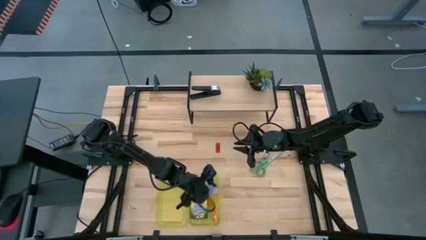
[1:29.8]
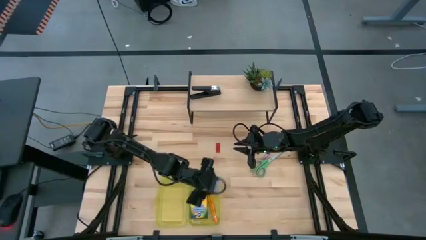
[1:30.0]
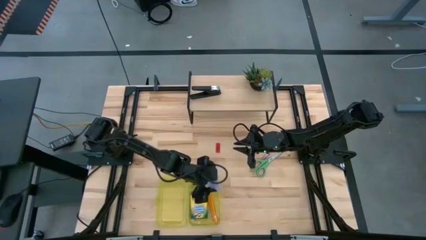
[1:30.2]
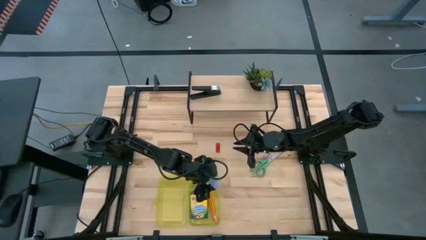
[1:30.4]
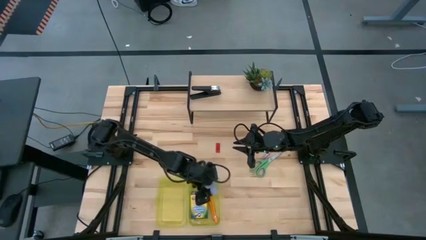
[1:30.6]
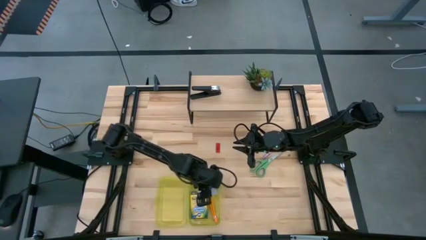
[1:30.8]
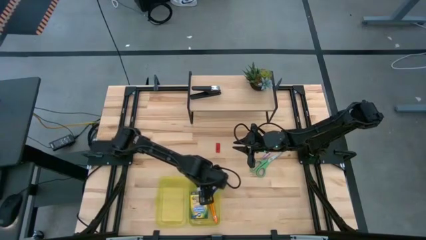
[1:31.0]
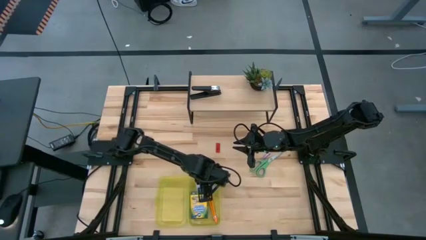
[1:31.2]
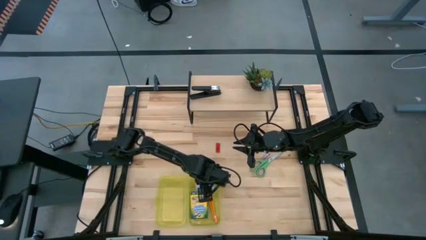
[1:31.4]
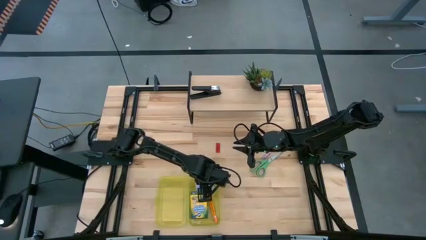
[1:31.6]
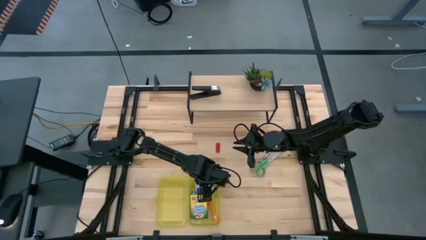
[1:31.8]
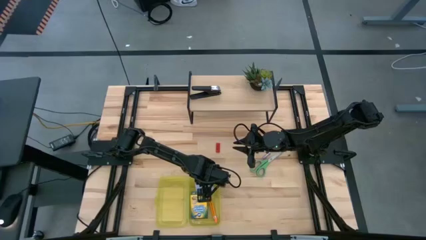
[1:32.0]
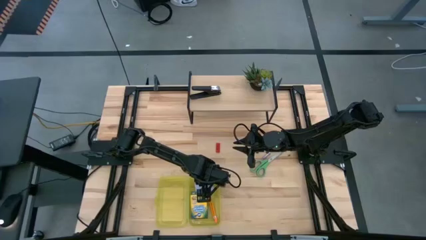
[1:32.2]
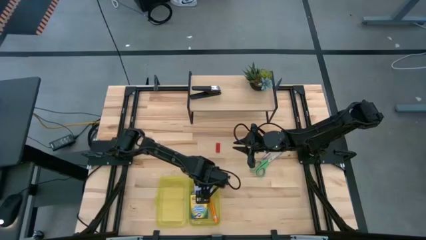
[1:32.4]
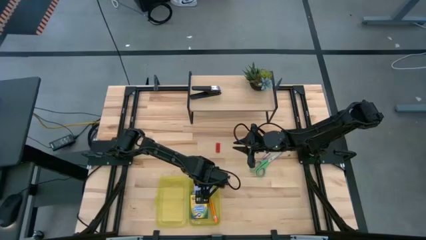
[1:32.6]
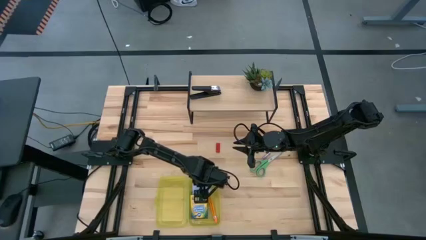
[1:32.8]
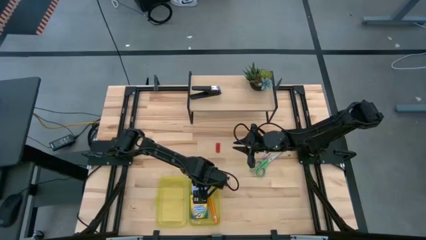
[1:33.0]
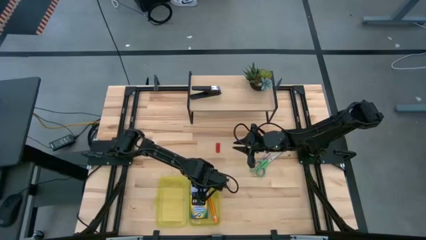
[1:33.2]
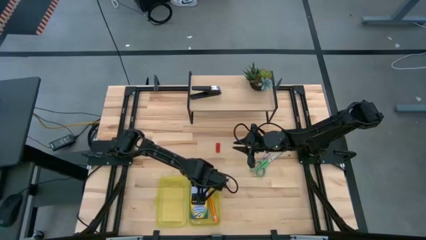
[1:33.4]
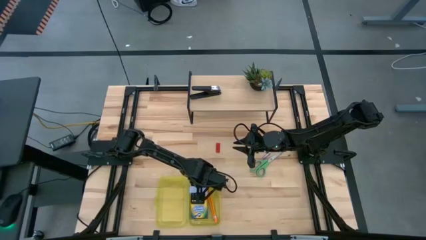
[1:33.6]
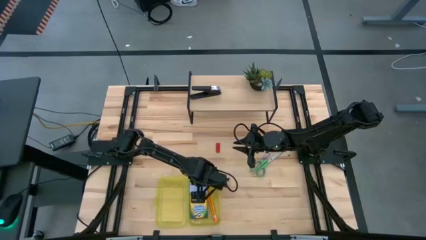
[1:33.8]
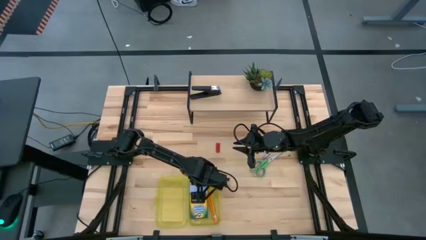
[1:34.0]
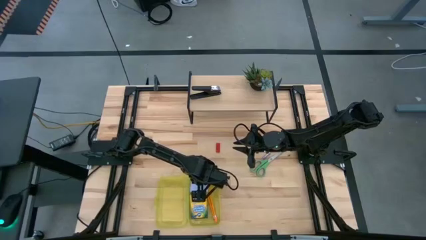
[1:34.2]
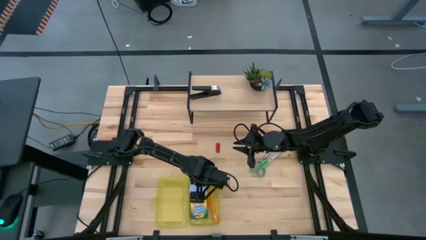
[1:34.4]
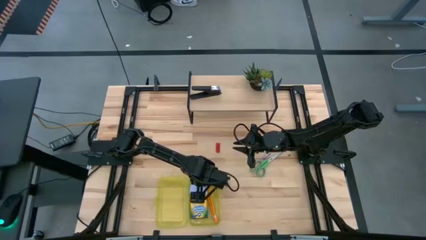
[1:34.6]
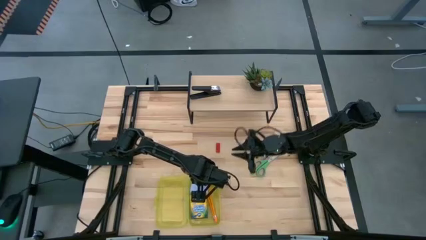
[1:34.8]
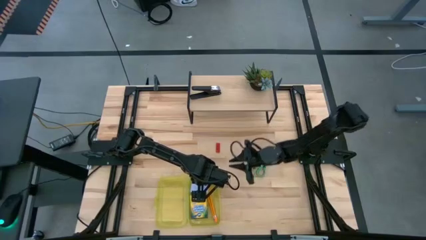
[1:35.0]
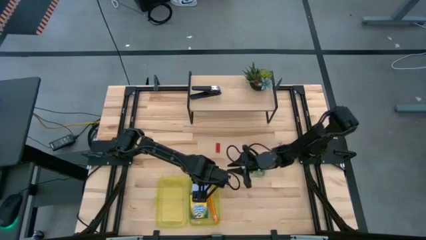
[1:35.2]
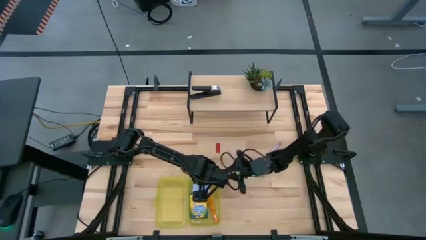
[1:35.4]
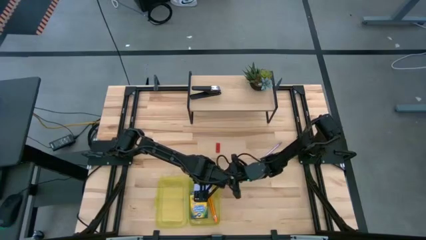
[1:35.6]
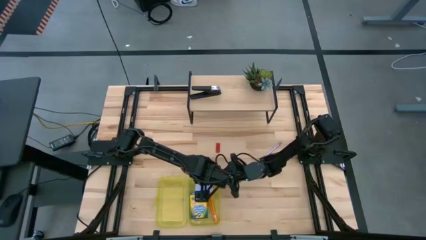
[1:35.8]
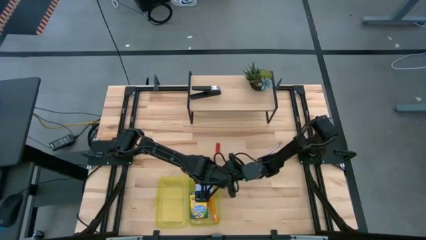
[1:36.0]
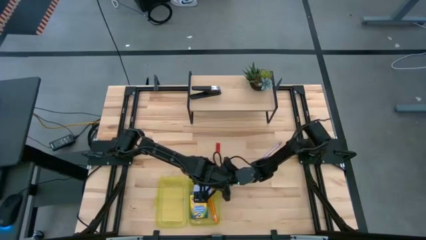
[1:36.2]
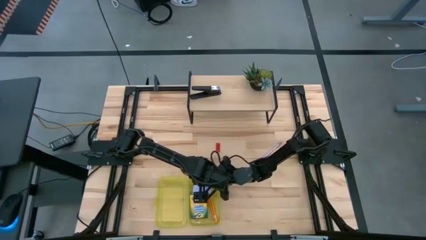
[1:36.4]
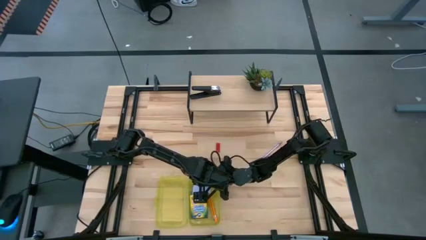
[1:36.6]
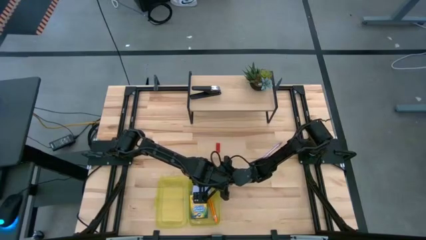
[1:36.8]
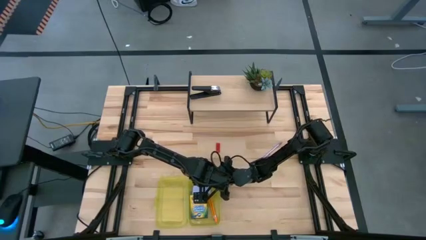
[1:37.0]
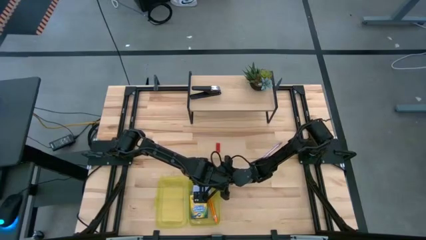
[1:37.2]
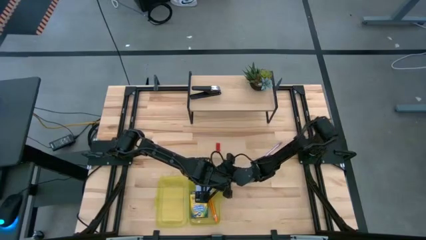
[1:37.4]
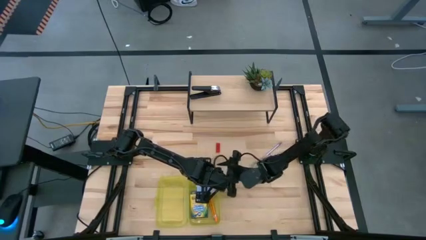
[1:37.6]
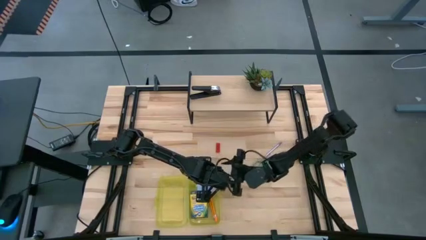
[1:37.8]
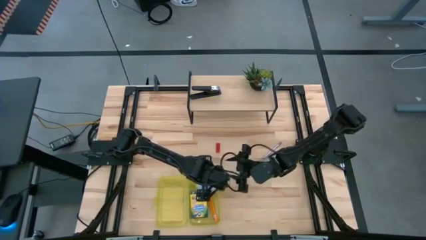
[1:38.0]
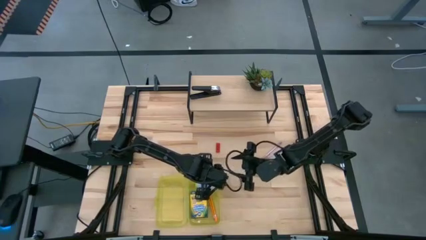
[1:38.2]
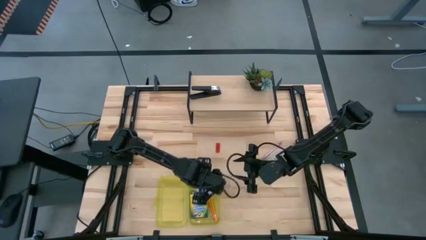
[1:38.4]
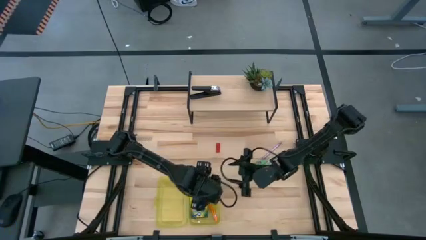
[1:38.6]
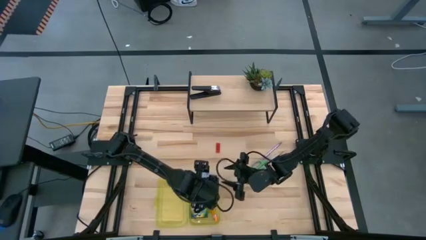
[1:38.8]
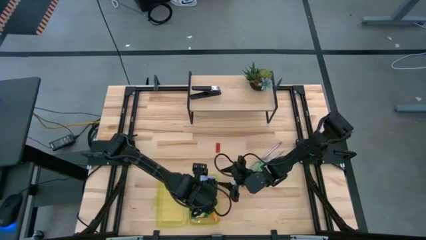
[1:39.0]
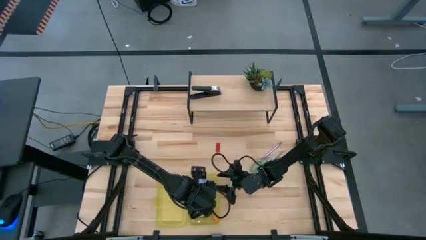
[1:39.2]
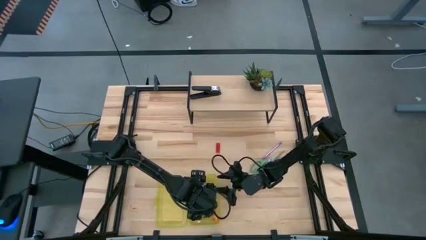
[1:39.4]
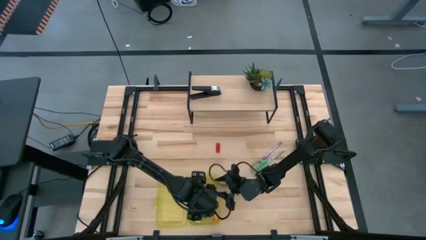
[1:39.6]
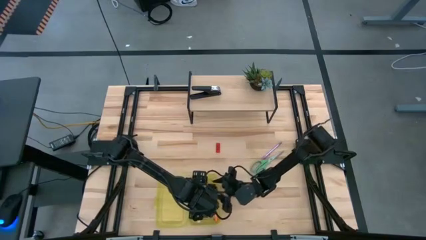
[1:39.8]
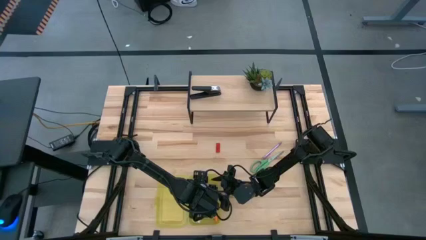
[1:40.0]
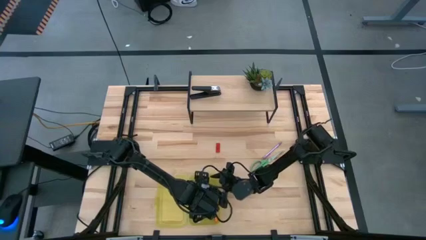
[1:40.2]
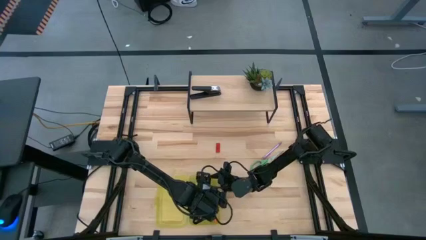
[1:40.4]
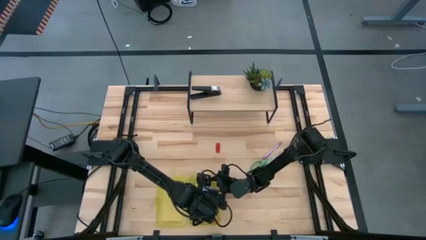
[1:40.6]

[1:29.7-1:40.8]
Task: Pack school essentials
Put the blue sticky note into the yellow supply box
